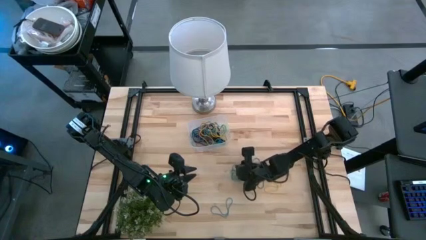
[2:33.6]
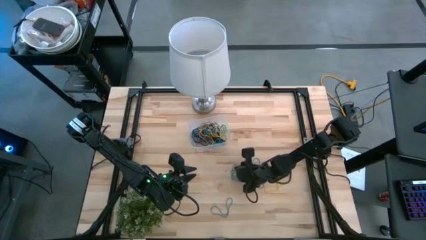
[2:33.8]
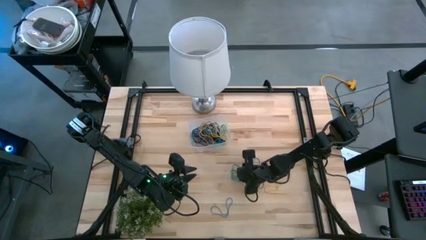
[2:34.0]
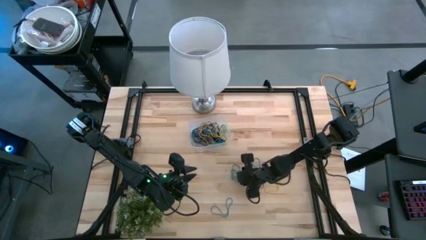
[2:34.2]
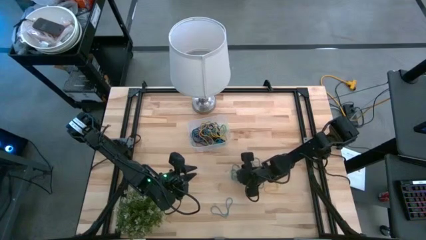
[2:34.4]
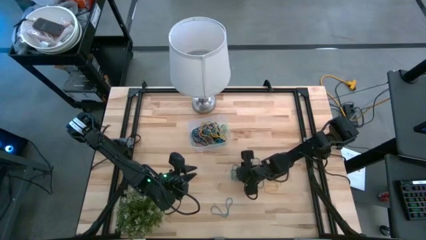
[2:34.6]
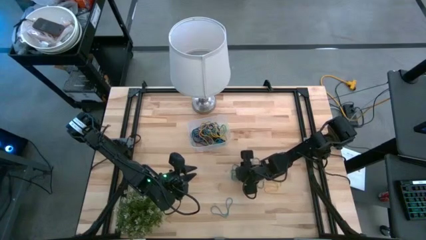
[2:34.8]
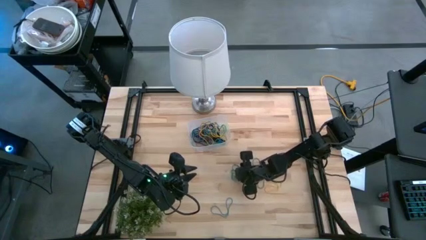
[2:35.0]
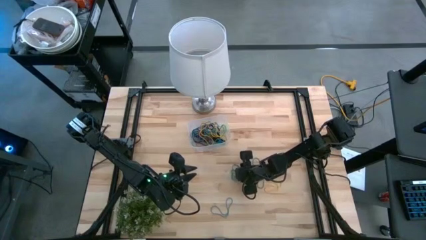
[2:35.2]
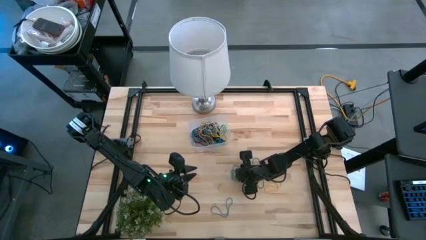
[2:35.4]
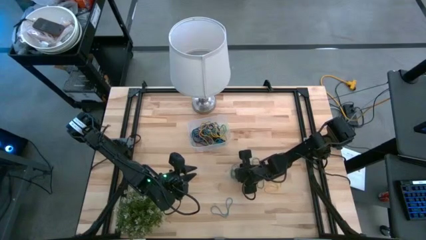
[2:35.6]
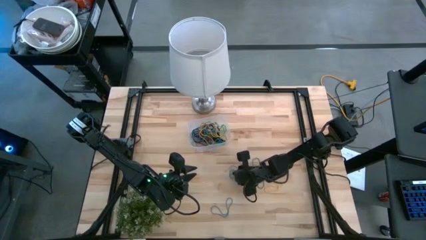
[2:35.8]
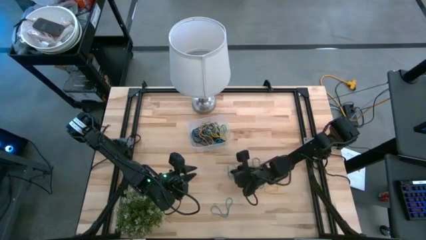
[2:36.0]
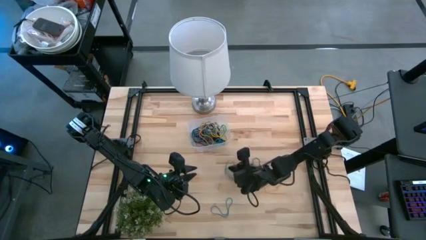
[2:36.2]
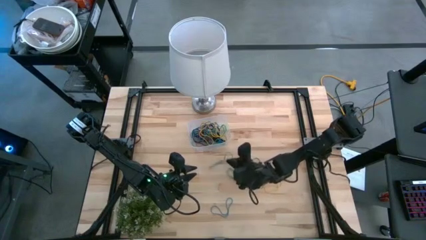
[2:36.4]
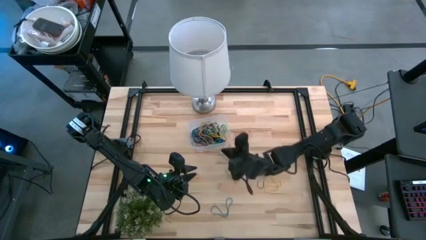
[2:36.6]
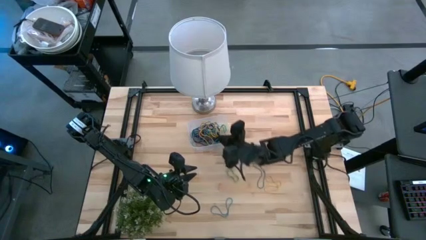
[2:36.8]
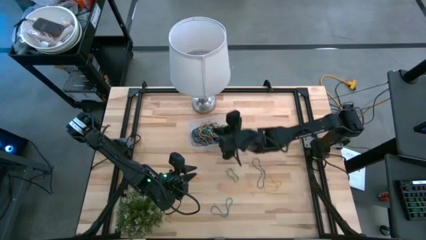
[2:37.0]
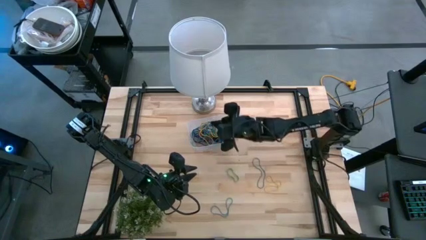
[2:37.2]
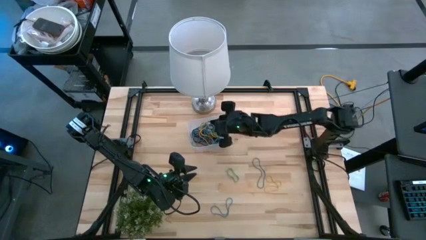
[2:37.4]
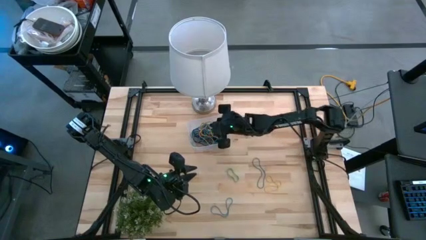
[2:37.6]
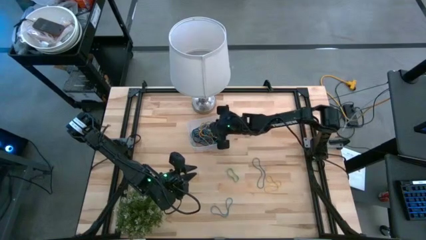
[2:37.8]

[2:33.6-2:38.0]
Task: Pick and place rubber bands into bin
Put the blue rubber band into the transparent container

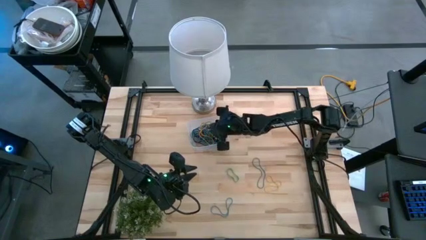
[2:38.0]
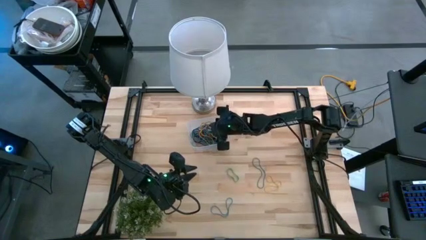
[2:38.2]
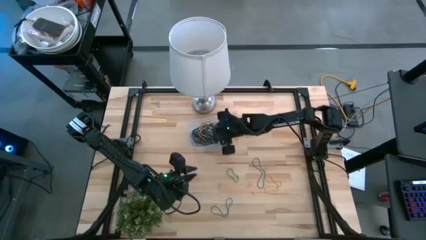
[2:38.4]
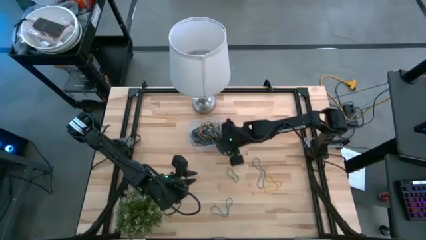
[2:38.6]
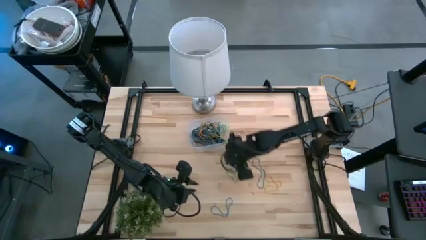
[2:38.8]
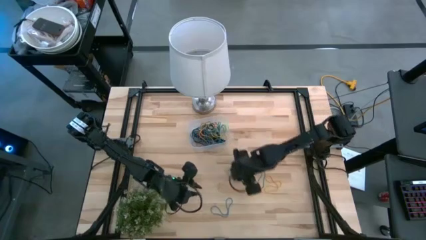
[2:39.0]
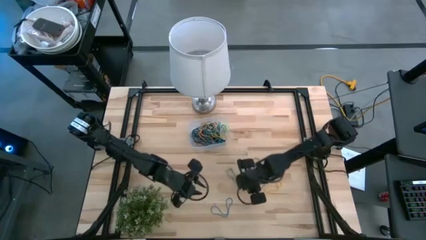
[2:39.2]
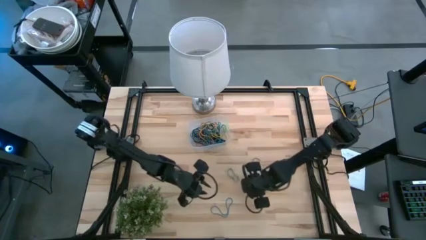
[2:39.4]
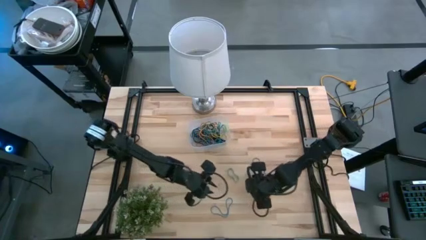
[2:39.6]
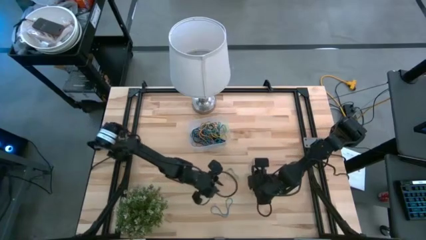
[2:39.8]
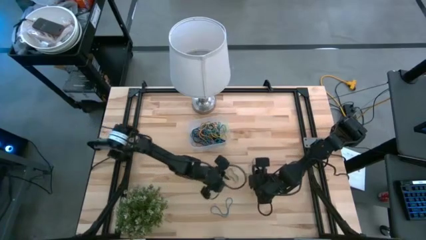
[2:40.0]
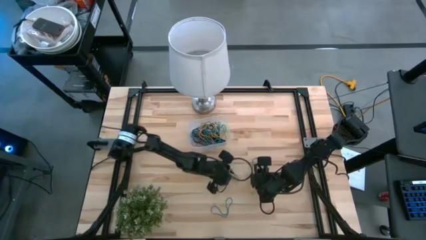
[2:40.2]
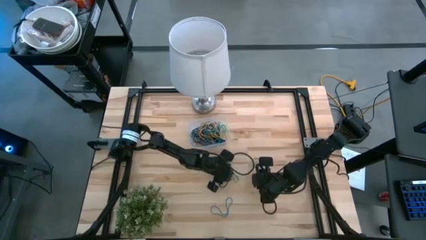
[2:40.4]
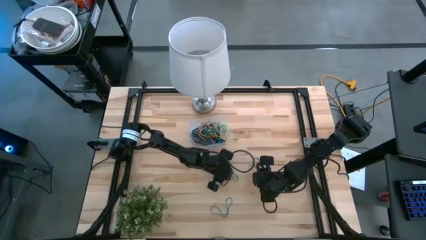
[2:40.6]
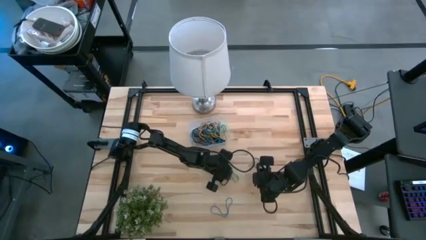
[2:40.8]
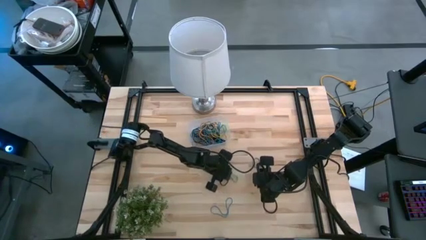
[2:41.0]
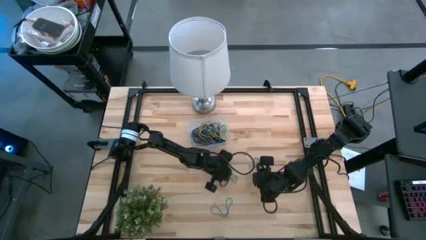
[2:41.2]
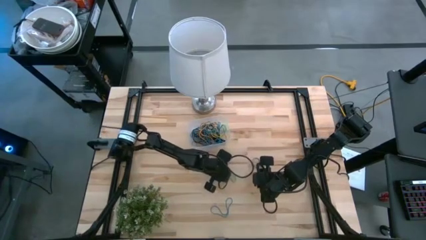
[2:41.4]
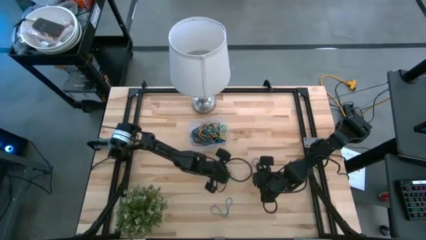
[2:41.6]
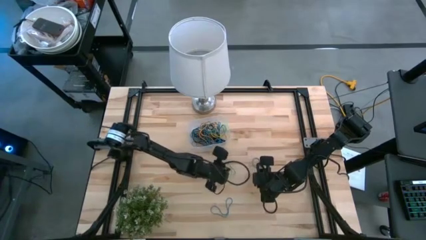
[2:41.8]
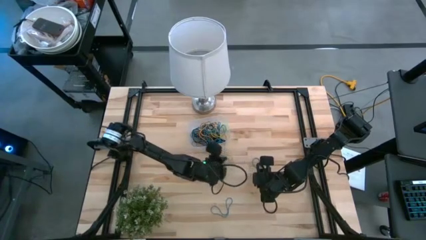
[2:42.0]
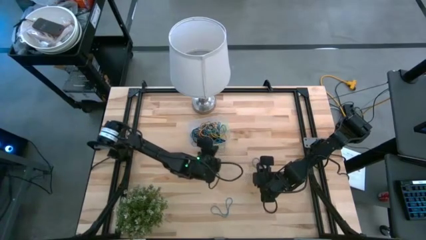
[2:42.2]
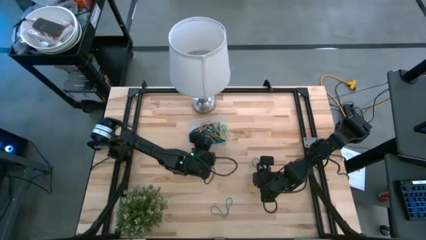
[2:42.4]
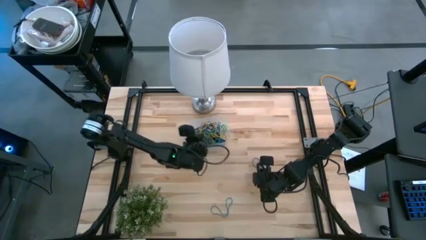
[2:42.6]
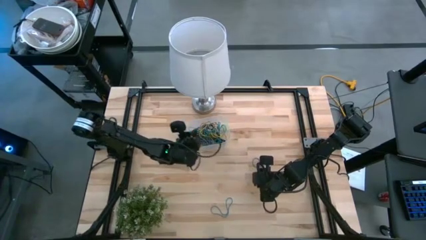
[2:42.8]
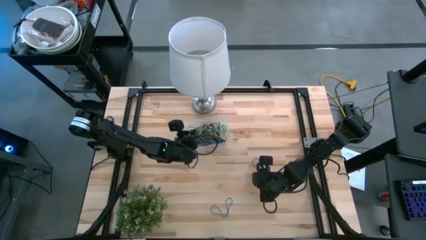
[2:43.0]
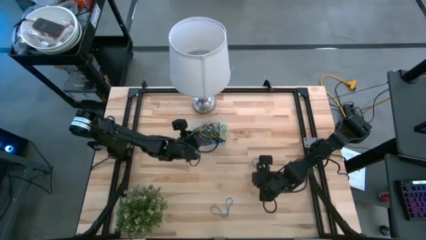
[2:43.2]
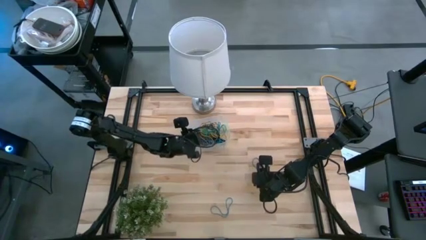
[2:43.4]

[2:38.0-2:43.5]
Put the green rubber band into the transparent container

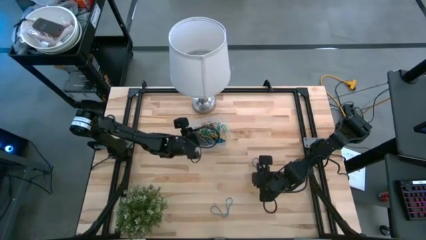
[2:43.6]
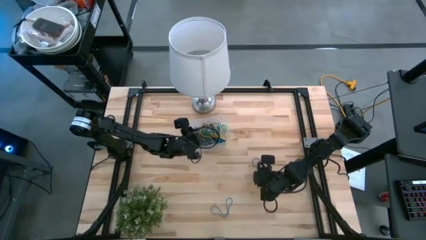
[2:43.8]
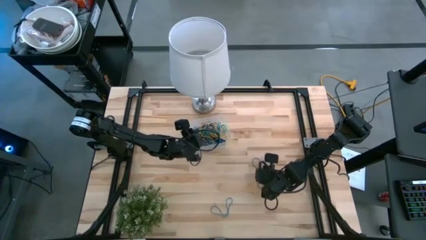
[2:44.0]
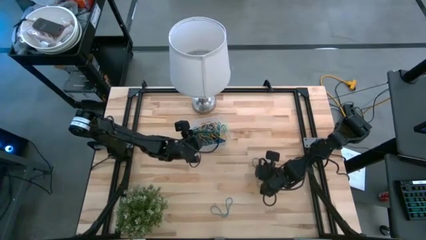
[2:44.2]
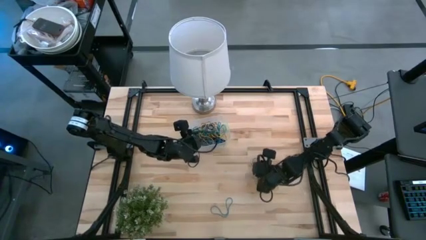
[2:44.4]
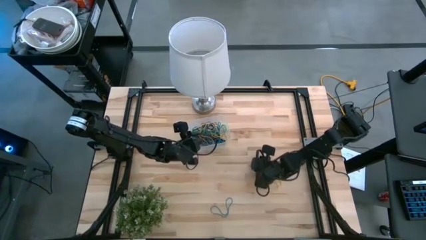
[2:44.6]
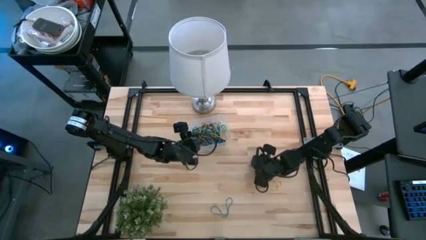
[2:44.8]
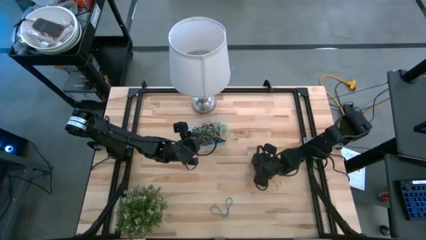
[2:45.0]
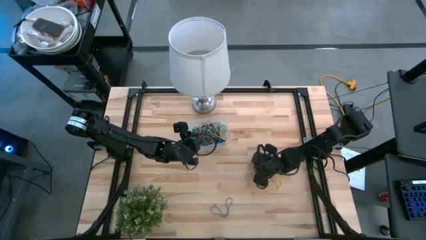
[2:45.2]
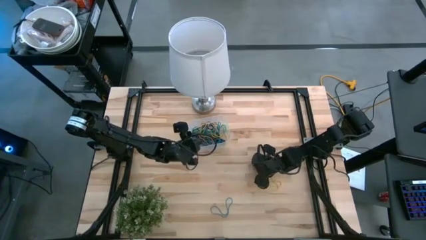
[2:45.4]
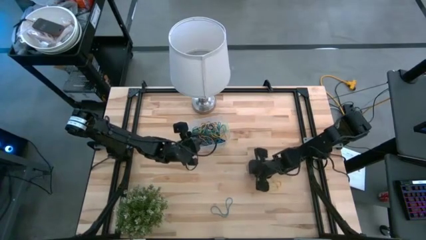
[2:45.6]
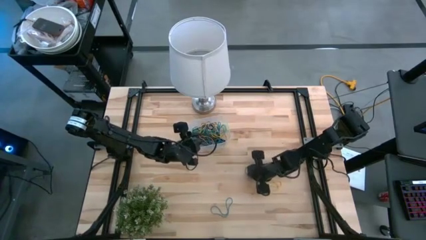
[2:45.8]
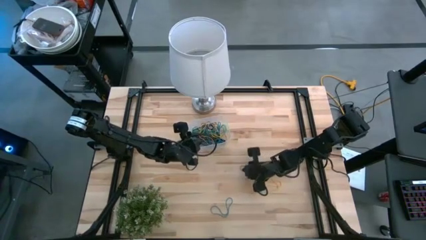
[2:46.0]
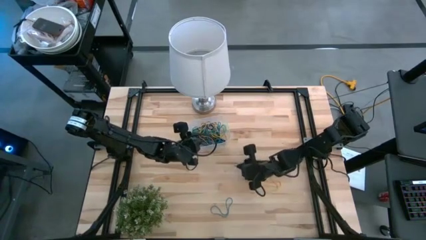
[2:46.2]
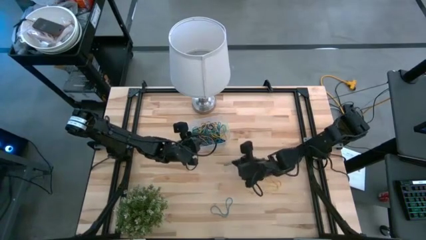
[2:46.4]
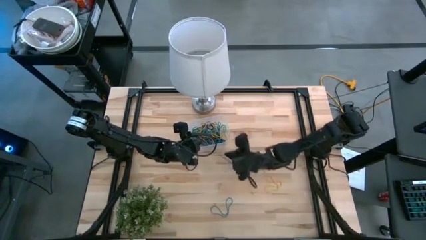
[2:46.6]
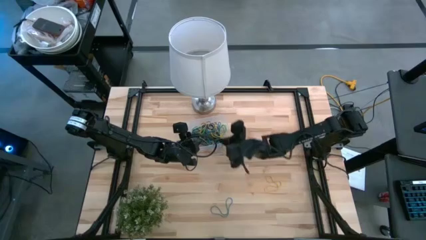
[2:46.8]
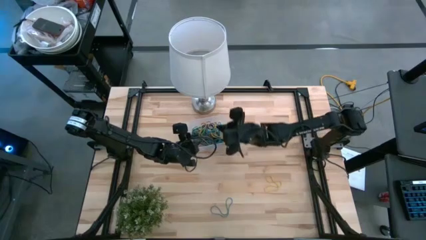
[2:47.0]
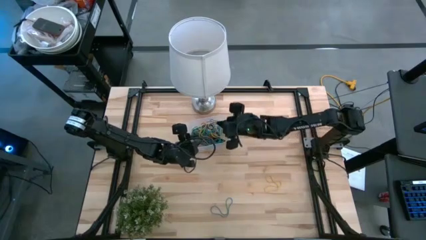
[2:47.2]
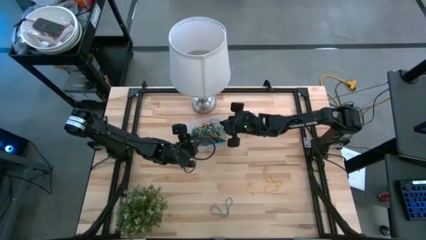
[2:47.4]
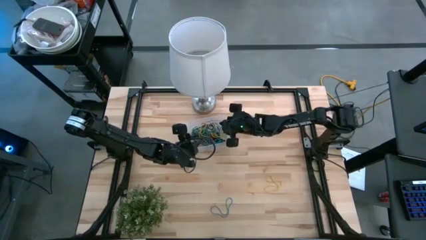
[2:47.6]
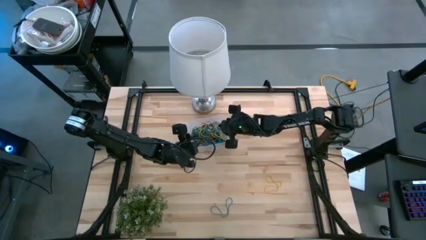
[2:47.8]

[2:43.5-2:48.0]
Put the blue rubber band into the transparent container

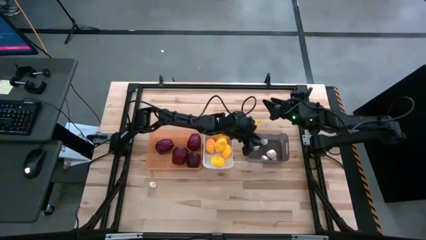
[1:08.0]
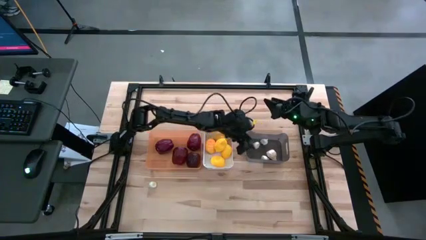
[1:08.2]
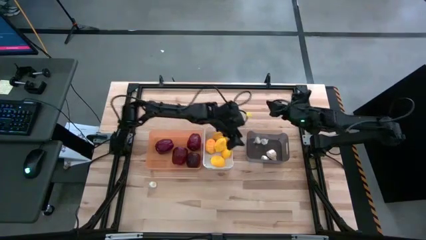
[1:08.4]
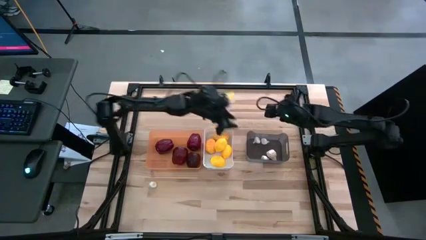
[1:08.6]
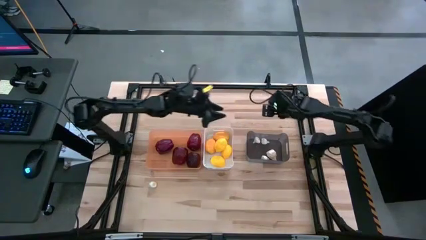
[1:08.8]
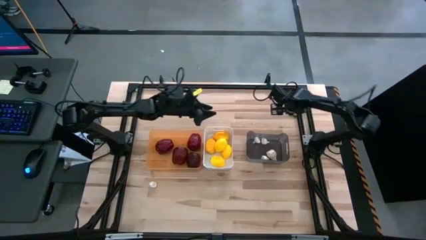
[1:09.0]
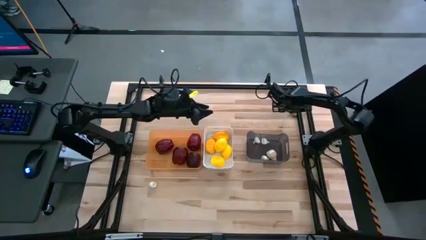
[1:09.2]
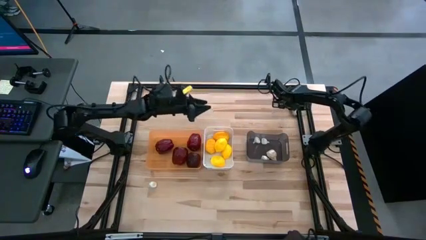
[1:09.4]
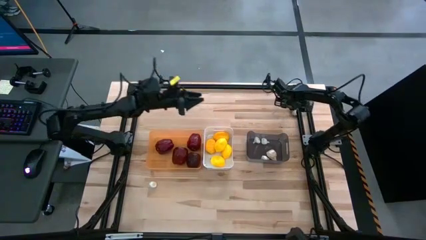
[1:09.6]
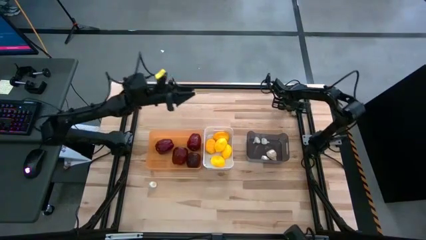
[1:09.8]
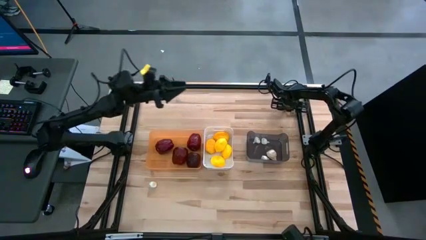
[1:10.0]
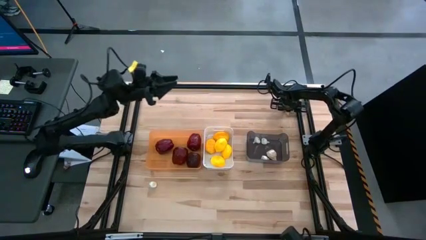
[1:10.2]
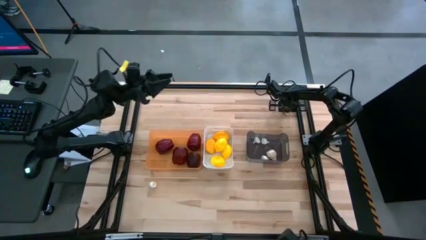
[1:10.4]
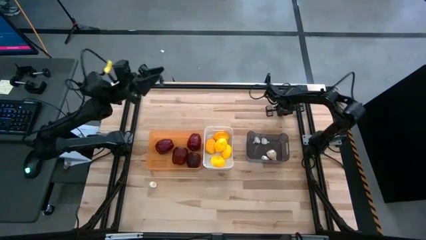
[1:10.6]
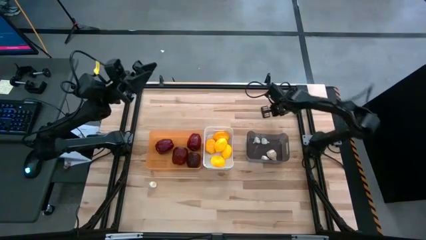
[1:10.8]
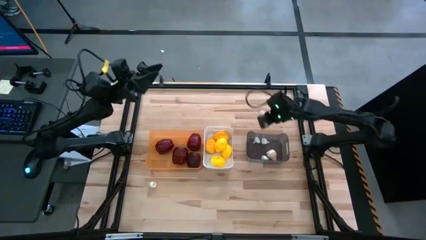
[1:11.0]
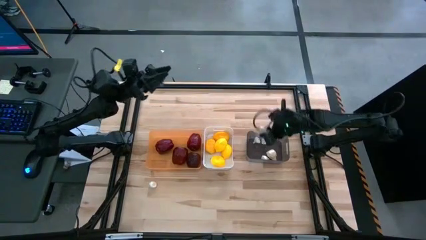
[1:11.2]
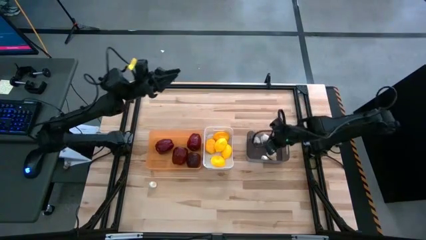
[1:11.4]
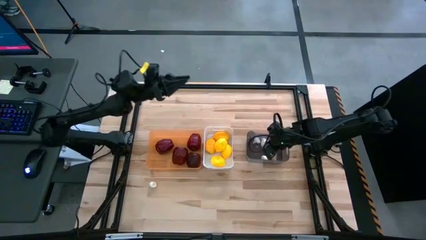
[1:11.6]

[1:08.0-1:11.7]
Task: Sort produce into baskets
Put the white garlic into the black bin
